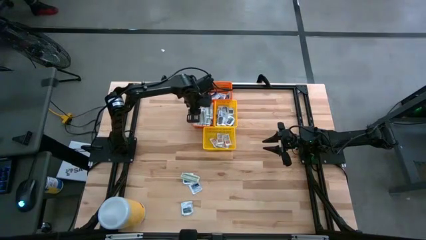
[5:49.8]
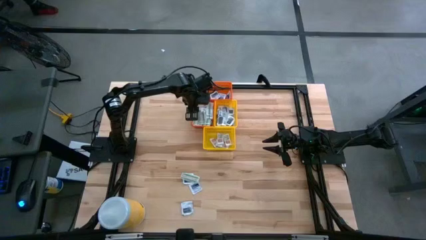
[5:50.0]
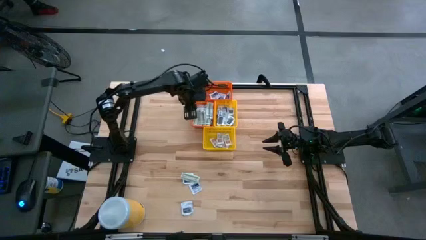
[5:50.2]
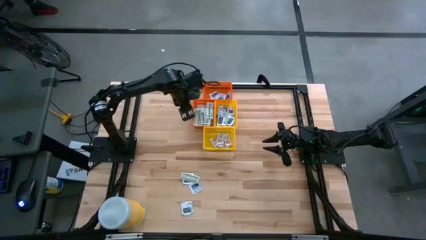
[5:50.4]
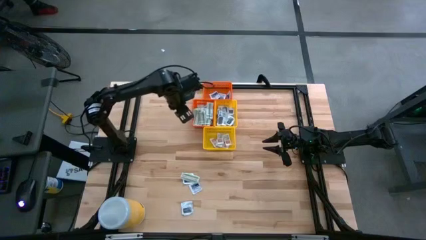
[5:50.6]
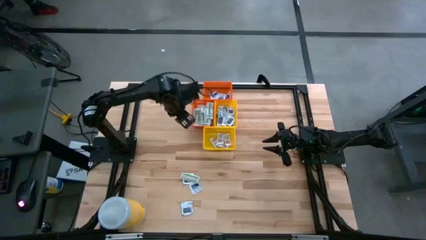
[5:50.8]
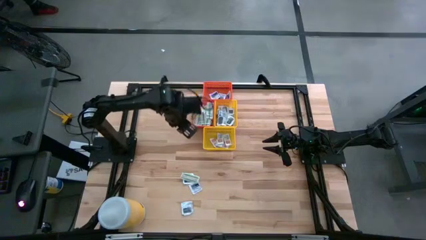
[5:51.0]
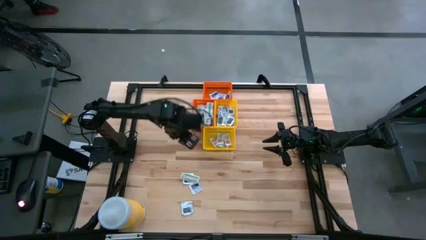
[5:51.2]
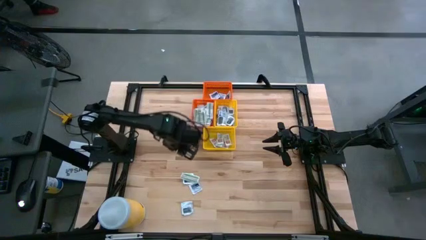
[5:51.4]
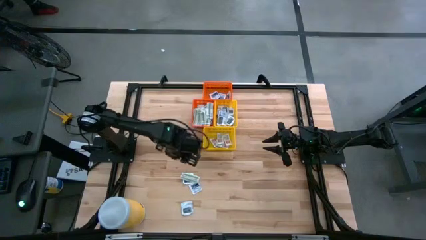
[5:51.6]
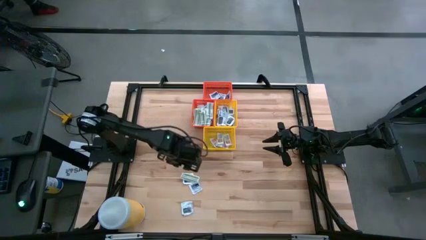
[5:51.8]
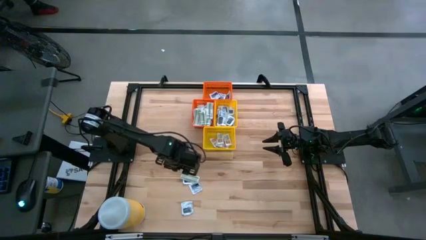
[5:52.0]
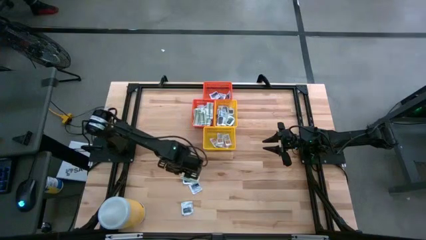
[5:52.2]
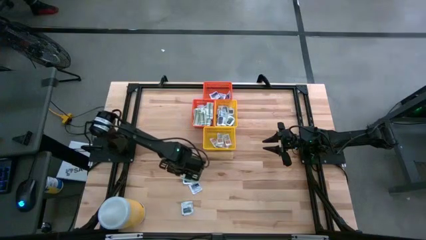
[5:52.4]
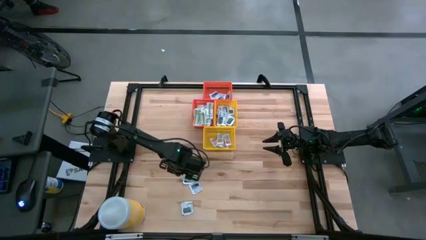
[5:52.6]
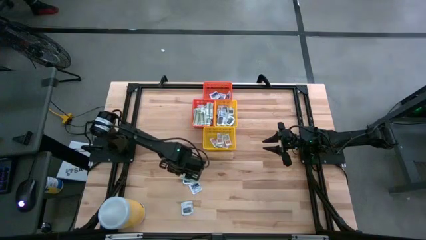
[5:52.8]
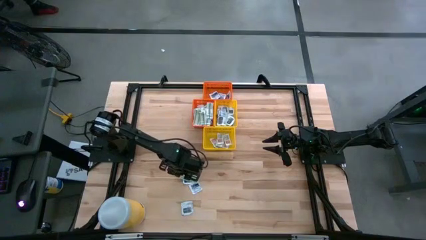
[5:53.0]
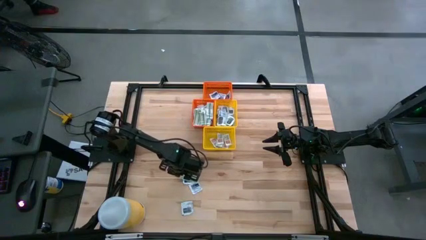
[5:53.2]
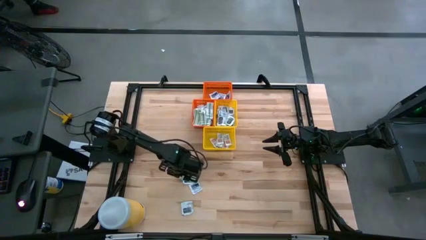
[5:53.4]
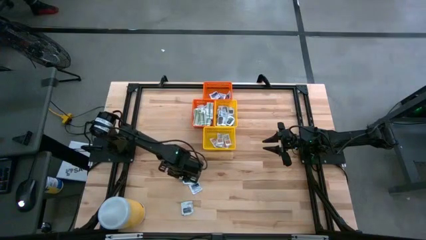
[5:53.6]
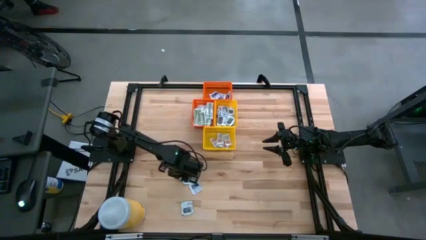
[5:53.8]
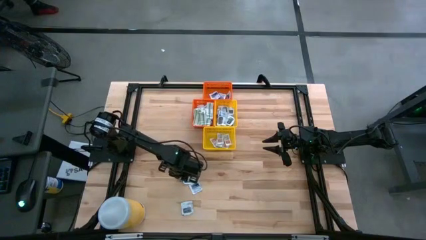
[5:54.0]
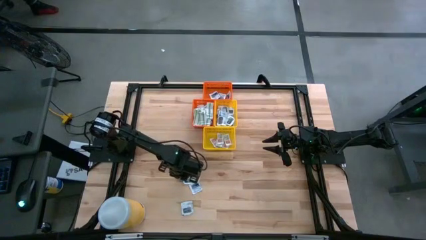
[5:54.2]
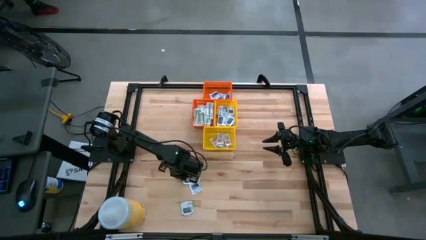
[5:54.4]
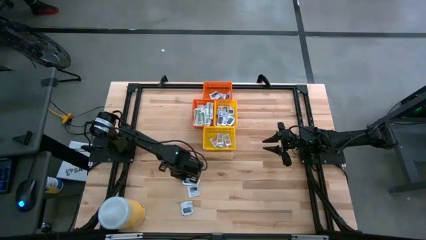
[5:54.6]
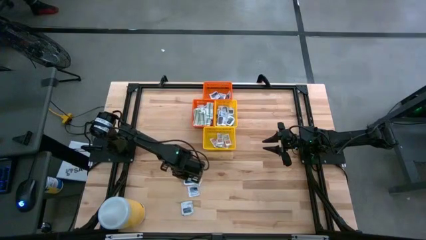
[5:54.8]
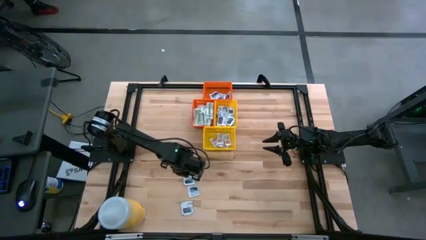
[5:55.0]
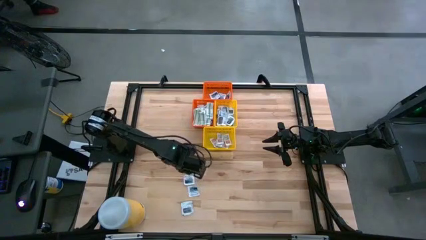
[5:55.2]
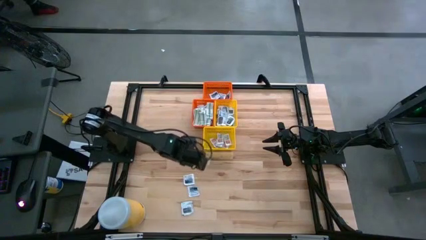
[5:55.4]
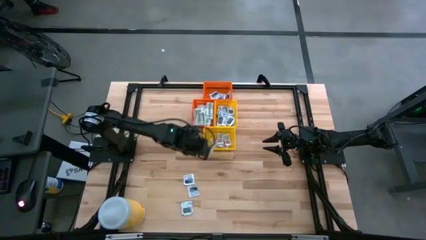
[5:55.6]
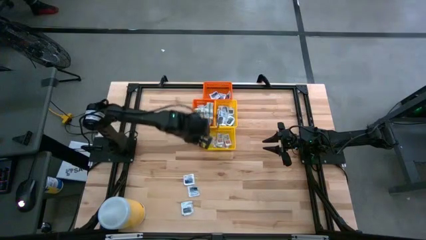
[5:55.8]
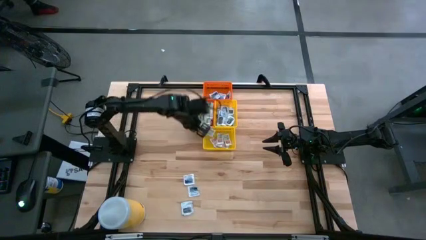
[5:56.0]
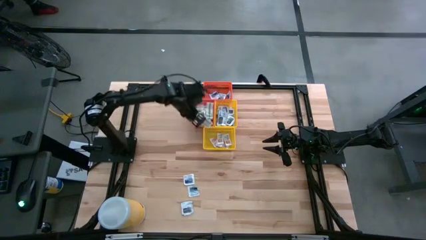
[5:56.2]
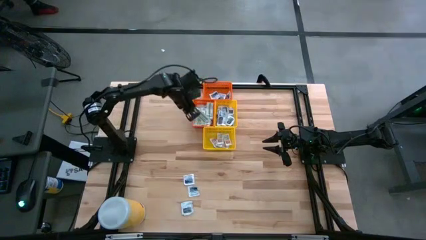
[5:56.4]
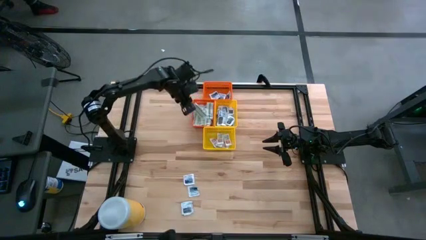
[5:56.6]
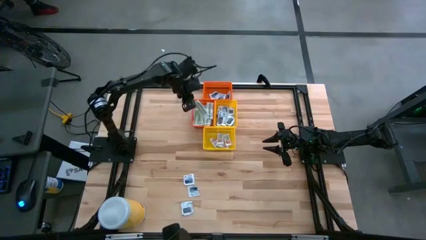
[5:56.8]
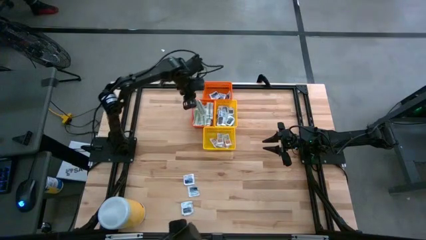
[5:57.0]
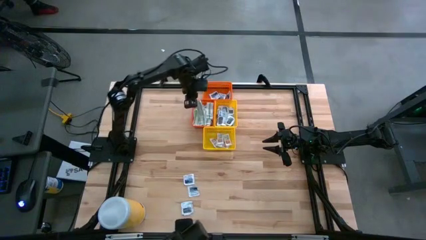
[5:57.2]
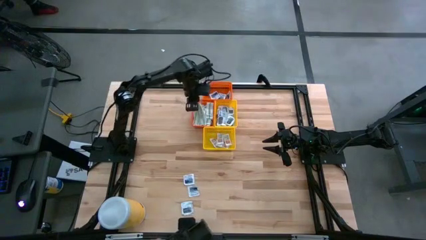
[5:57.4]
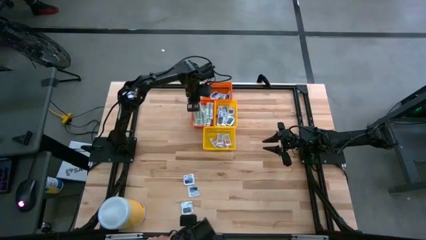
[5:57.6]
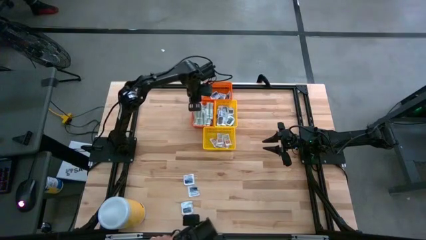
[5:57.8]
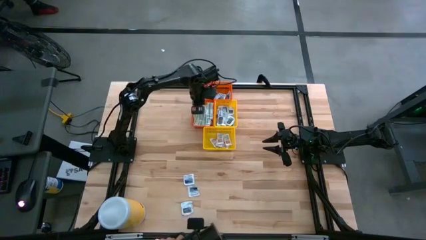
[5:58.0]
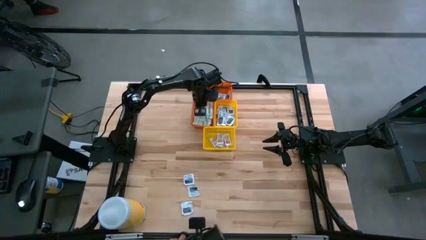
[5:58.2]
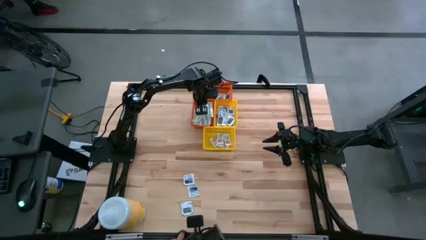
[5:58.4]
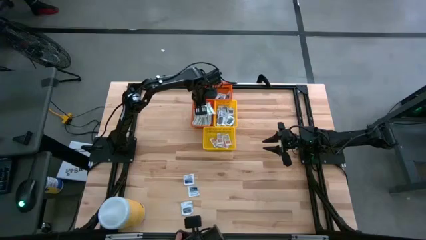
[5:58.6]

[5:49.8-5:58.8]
Task: Pick & Place First Aid Supplies
Put the bandage into the bottom orange bin

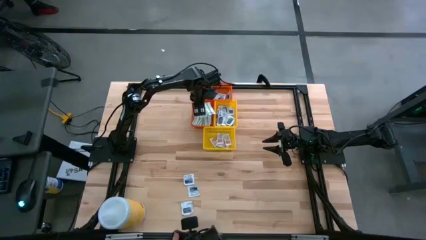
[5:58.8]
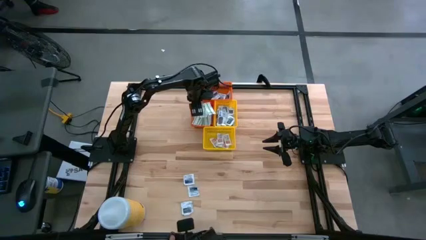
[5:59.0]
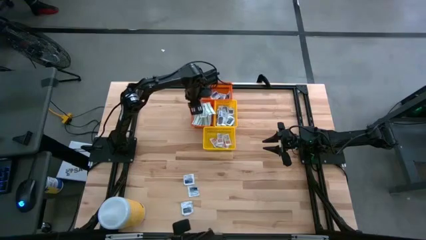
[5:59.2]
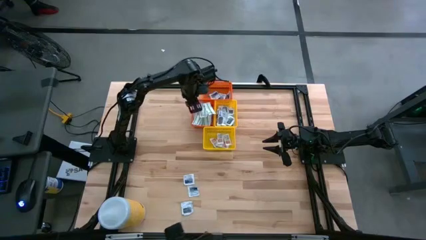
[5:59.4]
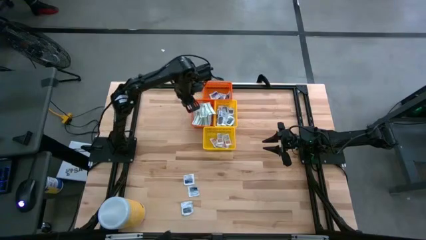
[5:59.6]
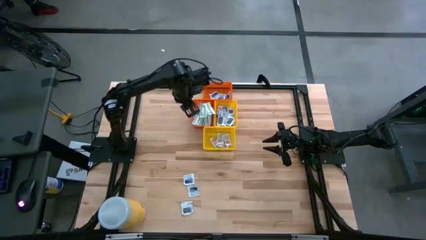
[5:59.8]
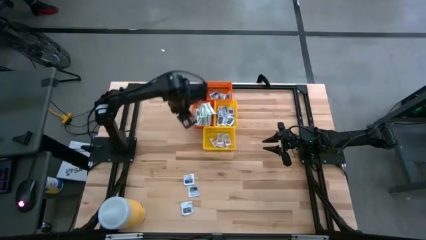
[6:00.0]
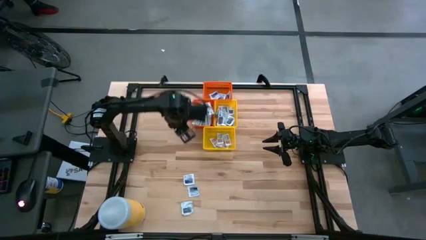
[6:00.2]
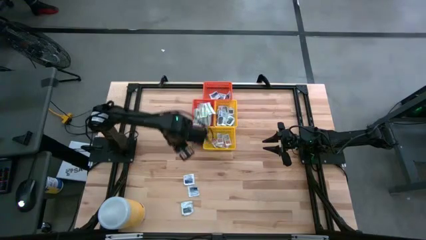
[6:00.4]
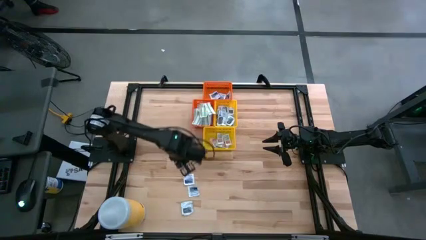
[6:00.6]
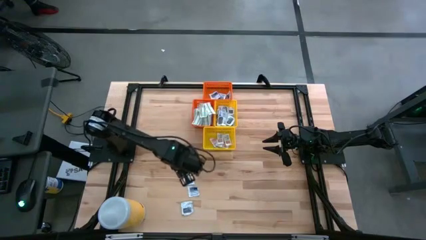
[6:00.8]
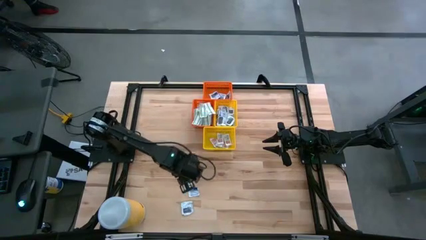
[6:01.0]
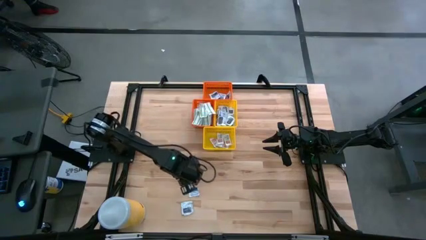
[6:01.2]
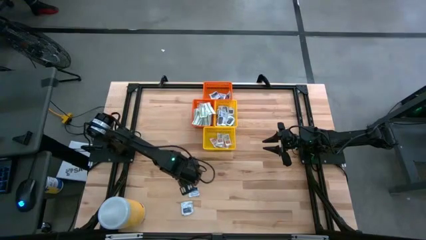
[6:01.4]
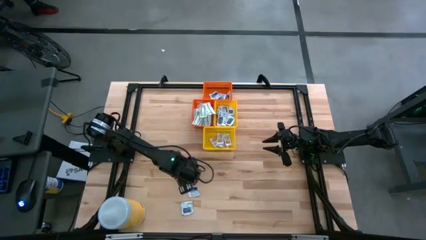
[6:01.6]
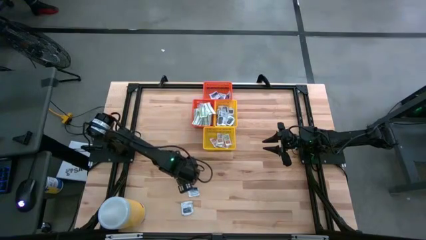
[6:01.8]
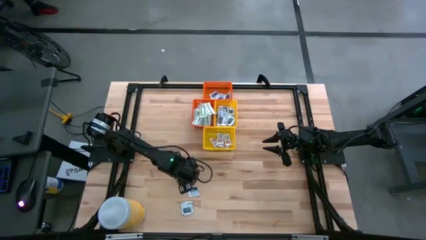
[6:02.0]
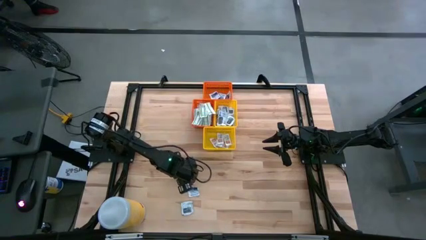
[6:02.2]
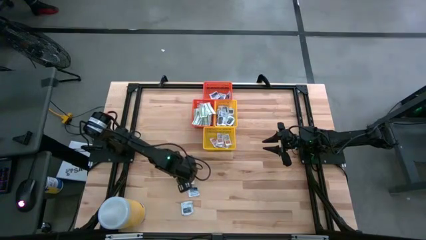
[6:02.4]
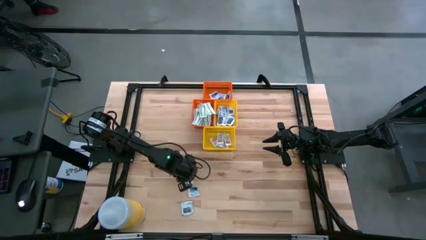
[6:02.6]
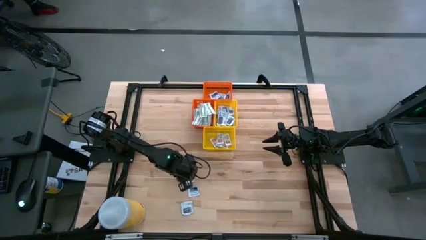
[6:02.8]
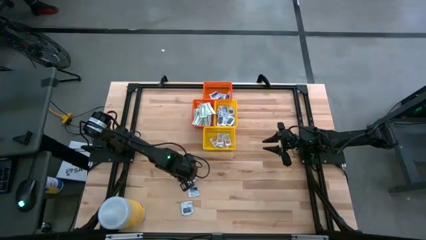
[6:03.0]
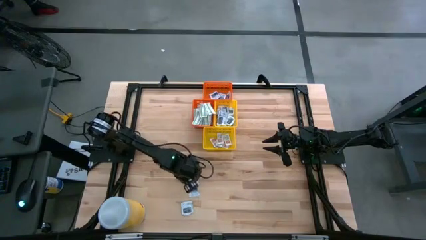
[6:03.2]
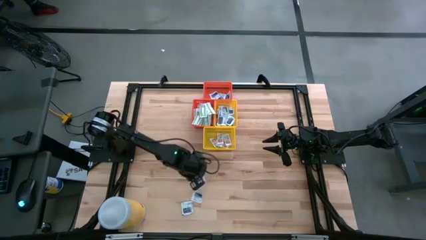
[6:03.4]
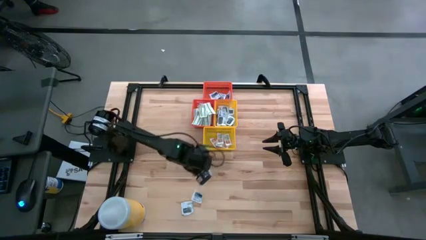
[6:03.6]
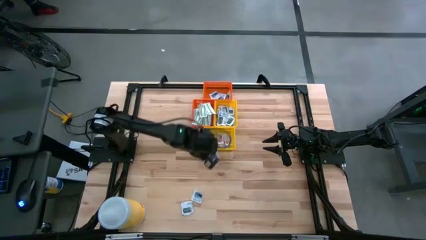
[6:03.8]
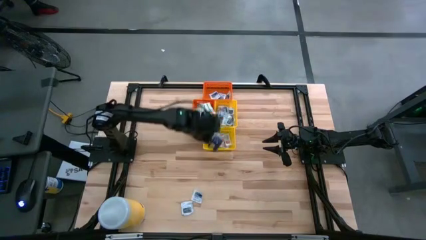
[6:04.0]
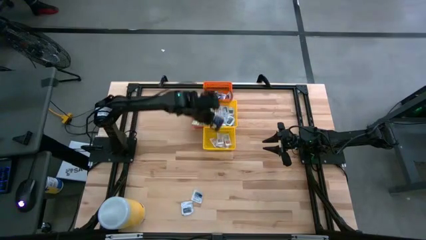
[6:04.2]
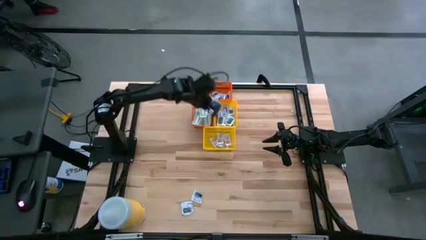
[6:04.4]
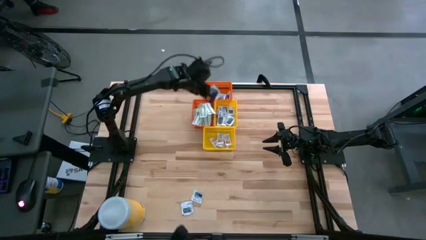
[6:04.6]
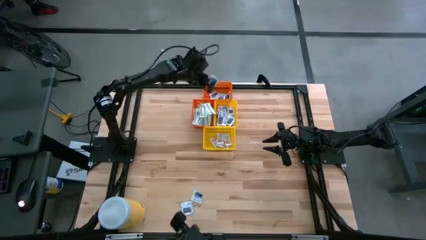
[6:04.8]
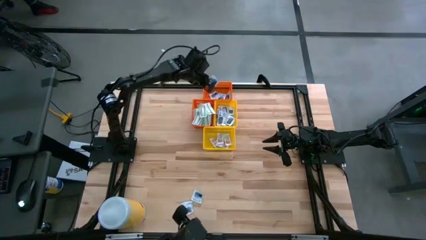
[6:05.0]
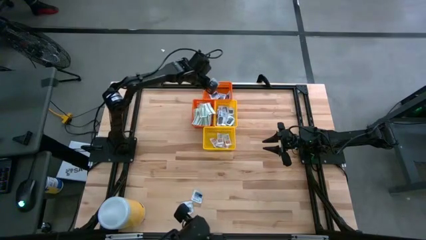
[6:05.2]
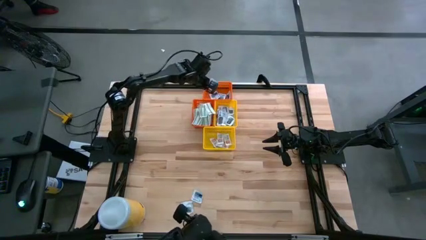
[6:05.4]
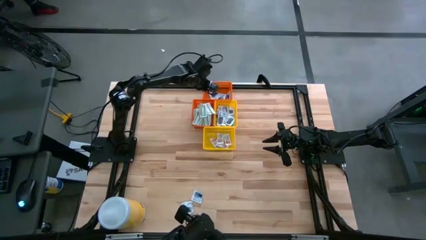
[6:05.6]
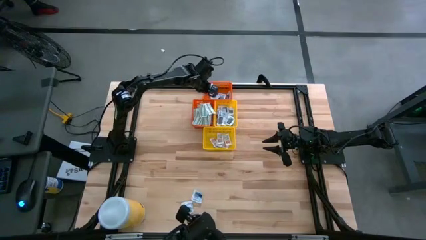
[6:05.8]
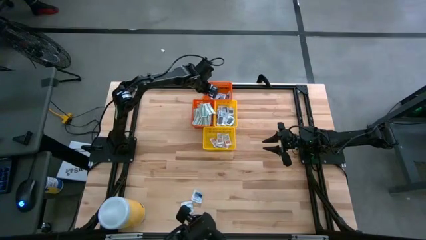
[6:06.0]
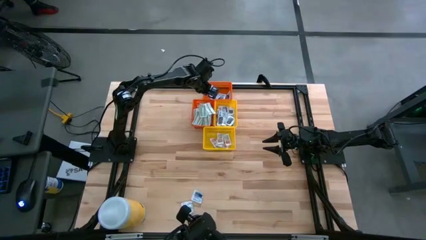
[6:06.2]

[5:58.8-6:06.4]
Put the alcohol pad into the top orange bin
